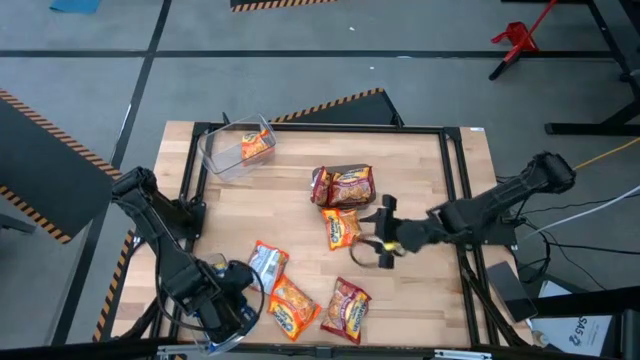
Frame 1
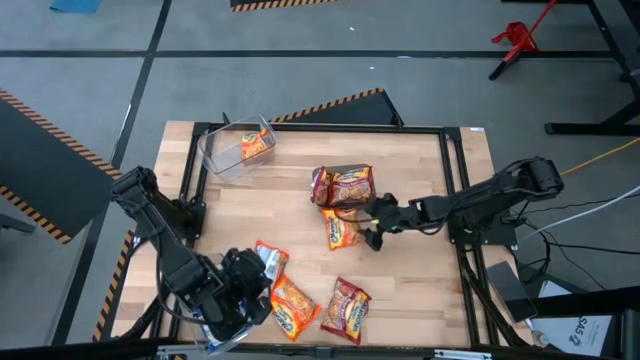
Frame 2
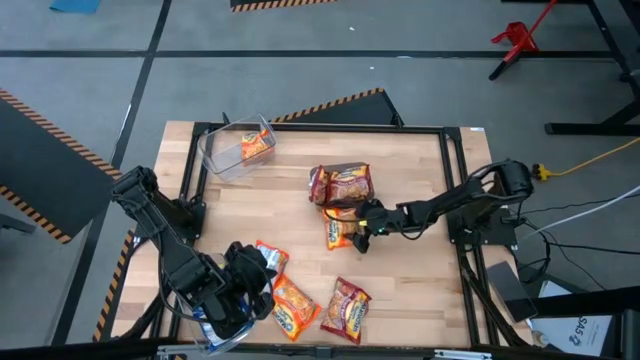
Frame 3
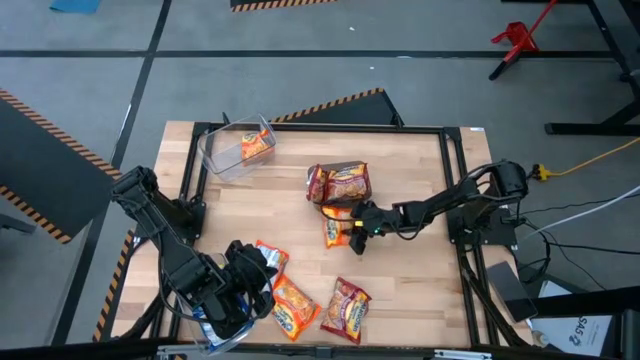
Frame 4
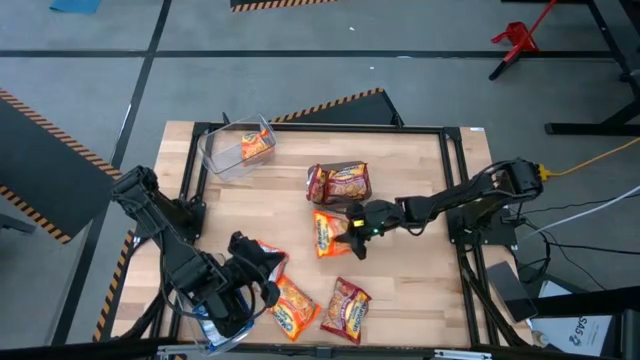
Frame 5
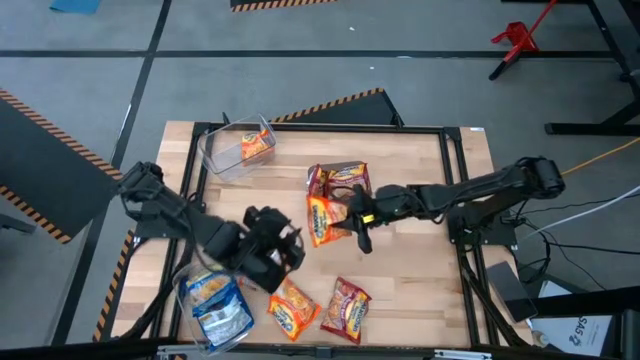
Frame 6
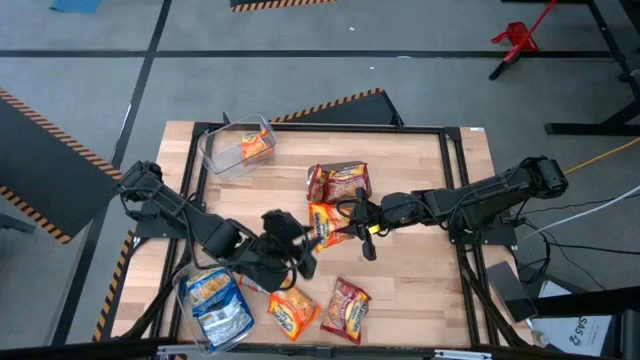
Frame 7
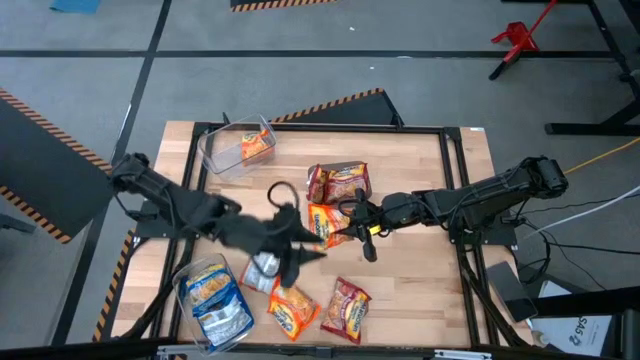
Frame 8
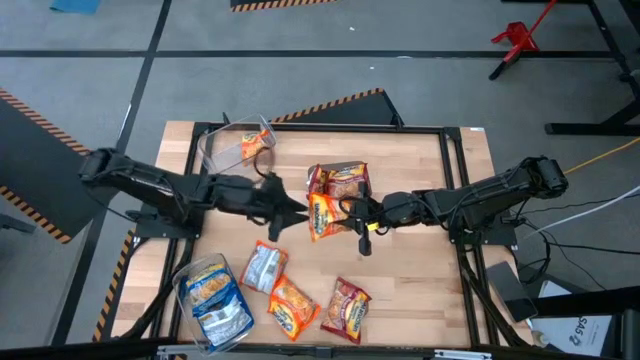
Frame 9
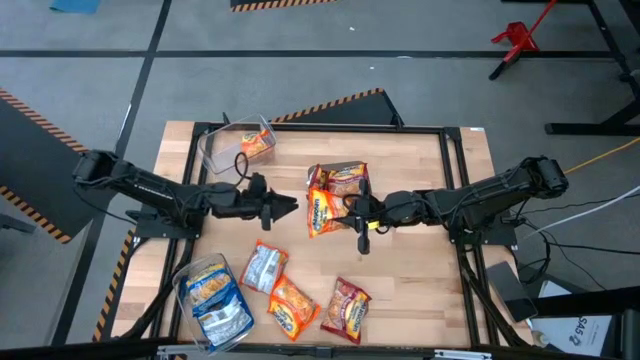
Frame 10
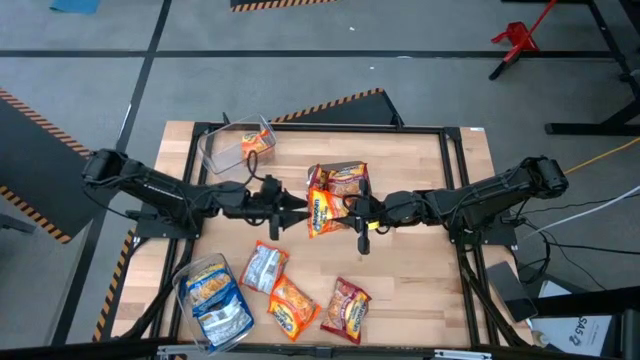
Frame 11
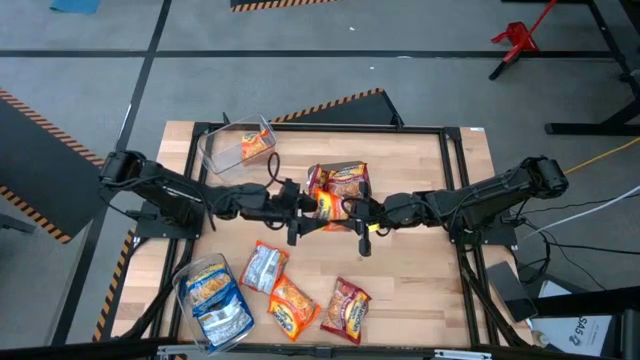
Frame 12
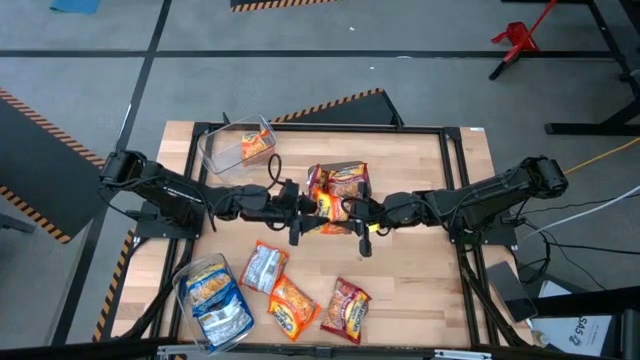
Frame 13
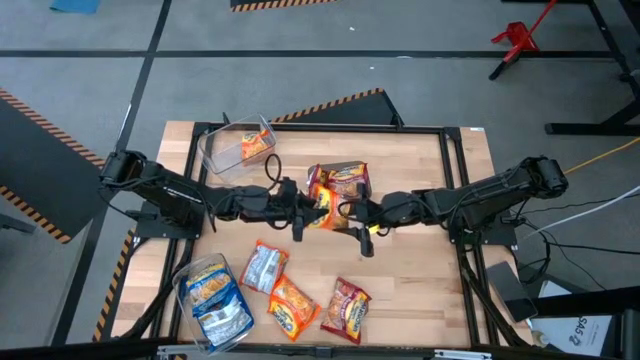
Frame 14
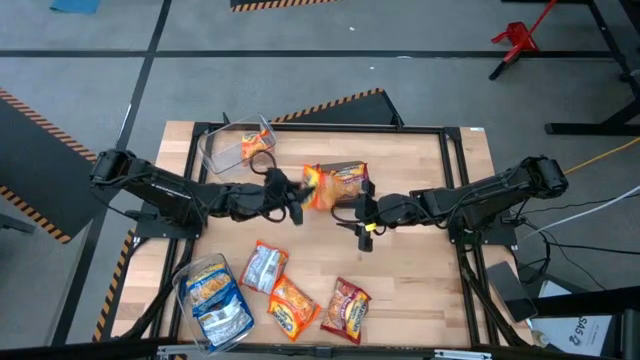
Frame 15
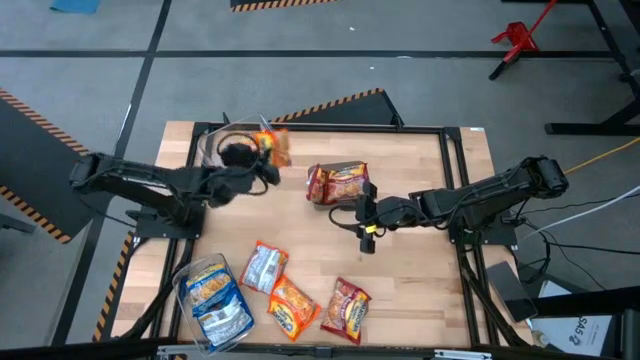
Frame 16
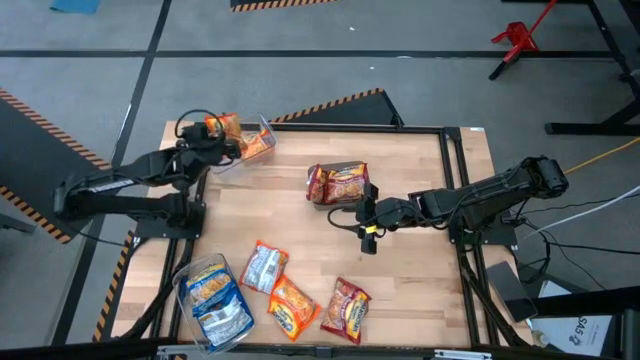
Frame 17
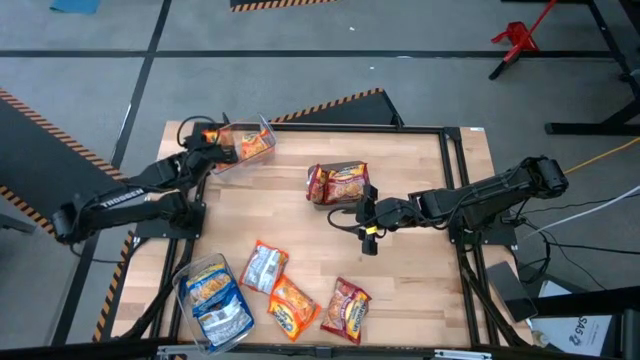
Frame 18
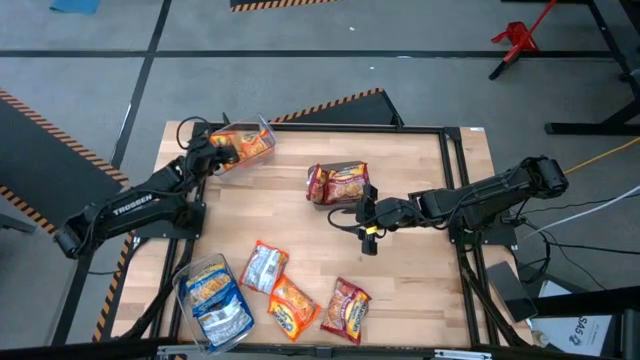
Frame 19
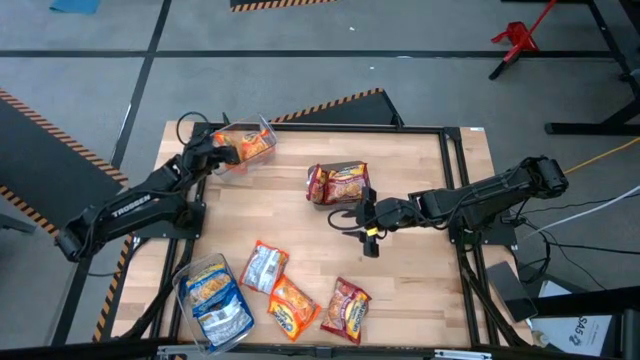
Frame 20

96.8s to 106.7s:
Task: Sort Maruchan noodles
Put the orange noodle pack into the top transparent bin

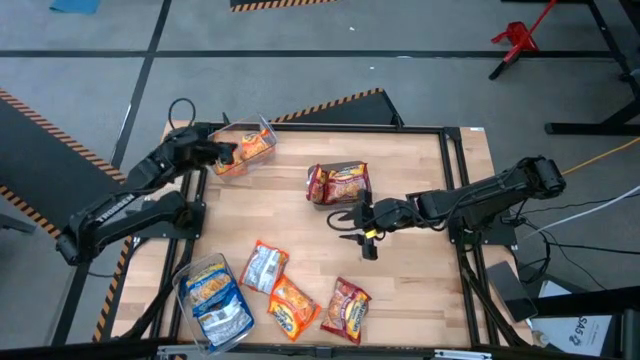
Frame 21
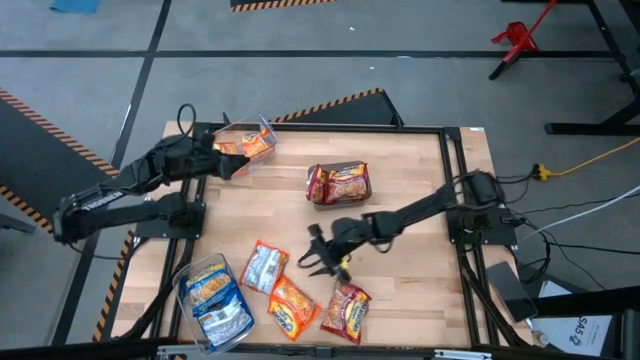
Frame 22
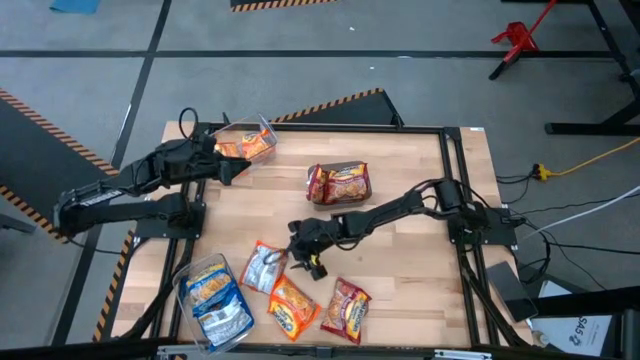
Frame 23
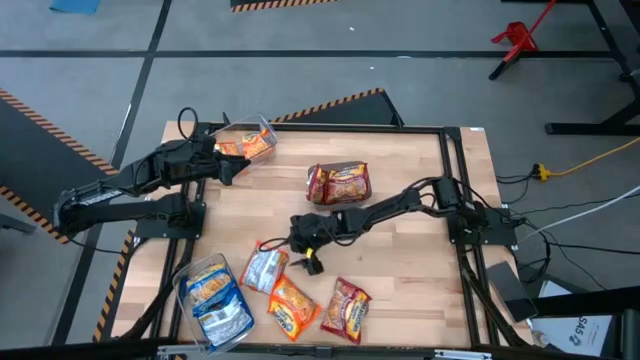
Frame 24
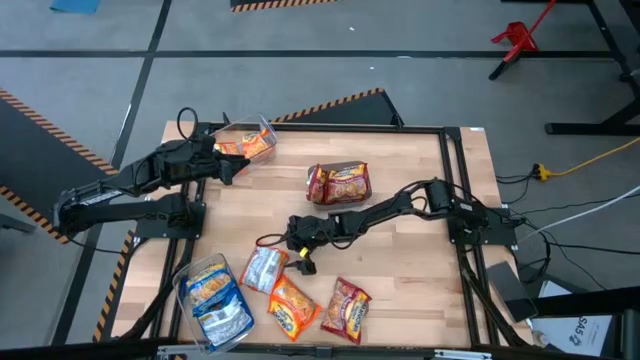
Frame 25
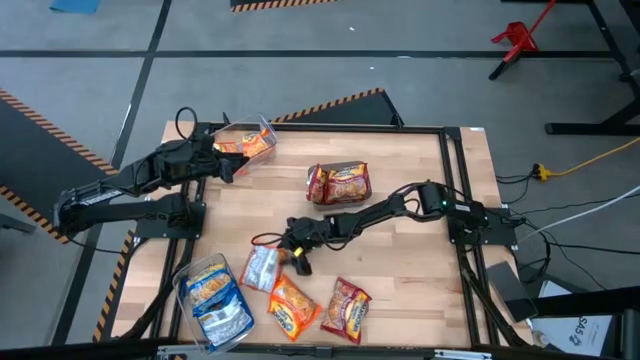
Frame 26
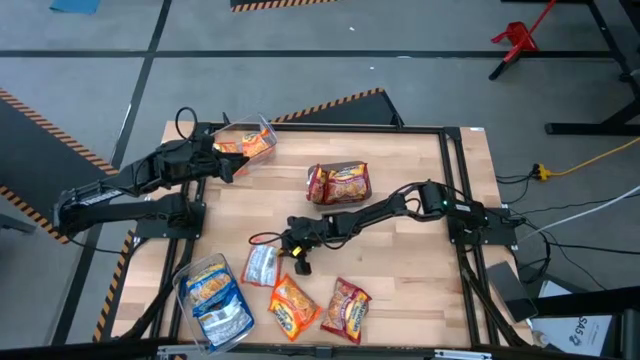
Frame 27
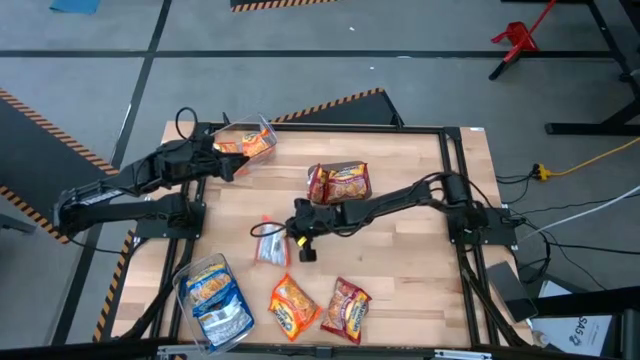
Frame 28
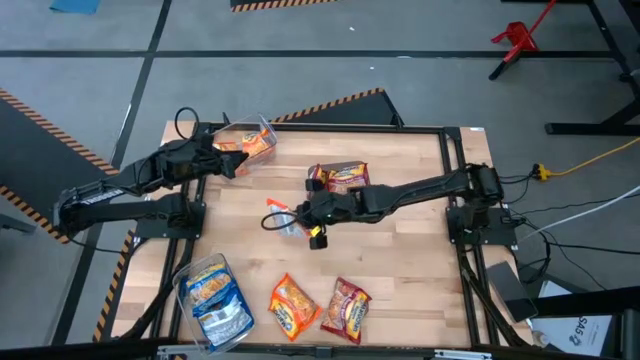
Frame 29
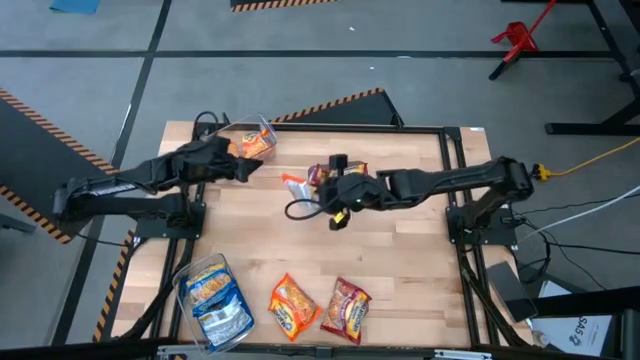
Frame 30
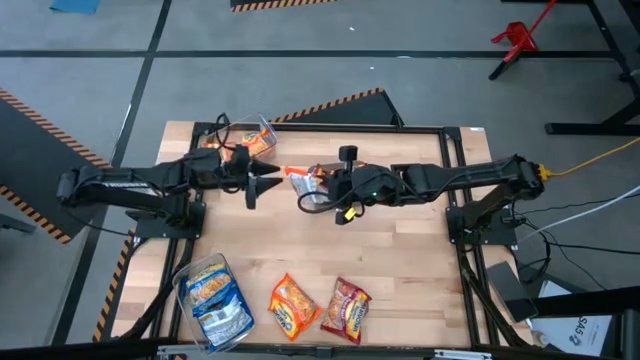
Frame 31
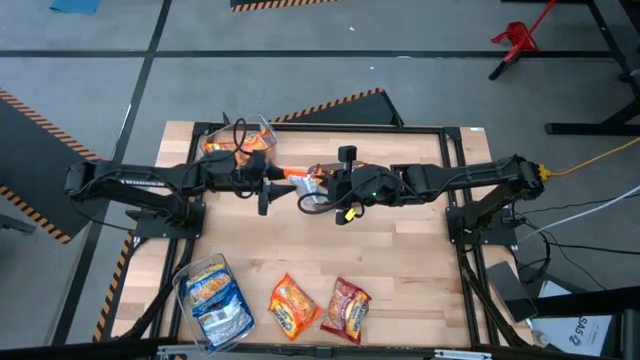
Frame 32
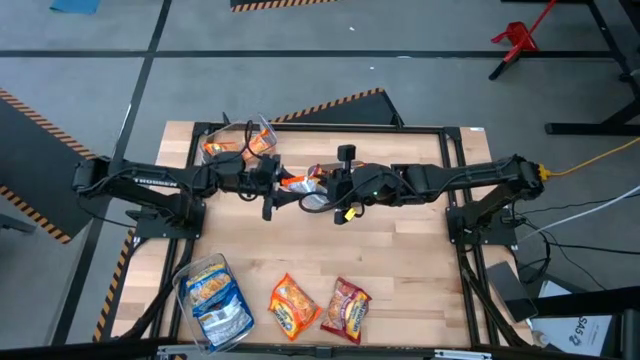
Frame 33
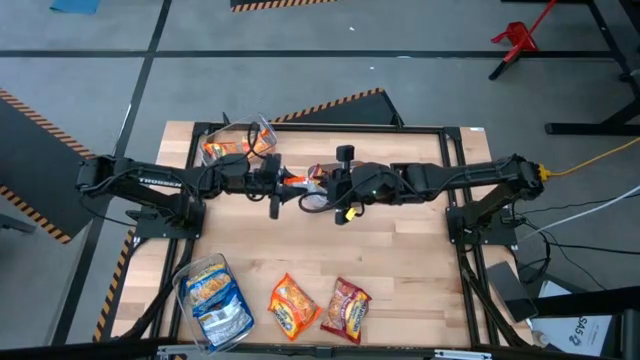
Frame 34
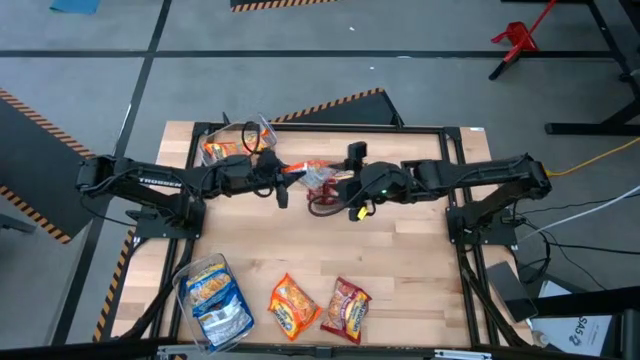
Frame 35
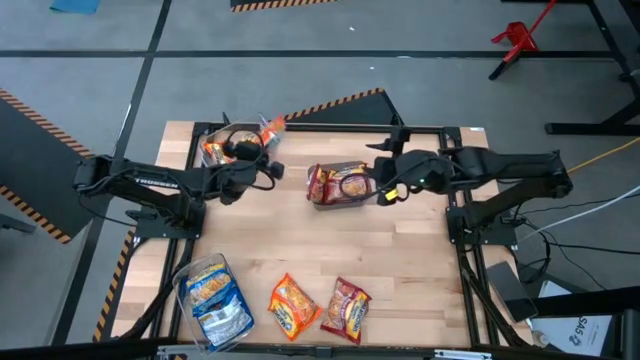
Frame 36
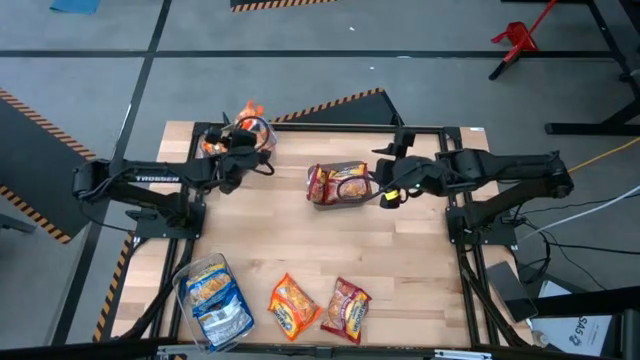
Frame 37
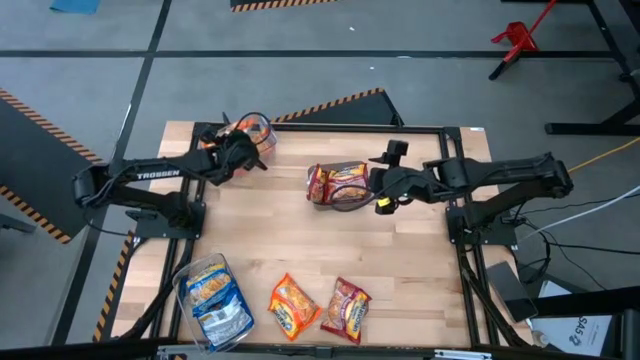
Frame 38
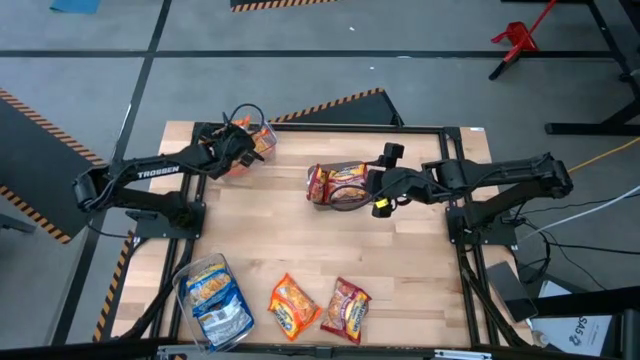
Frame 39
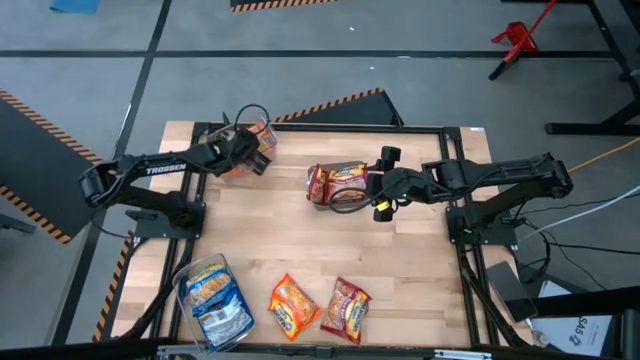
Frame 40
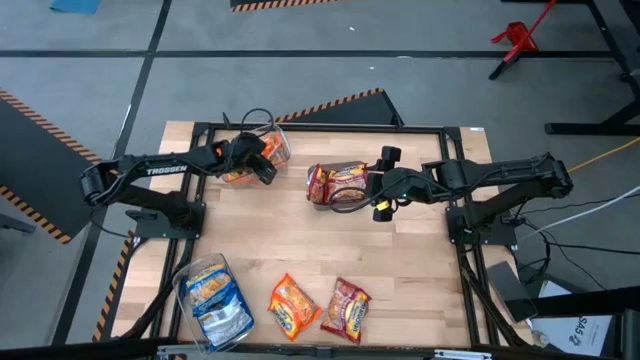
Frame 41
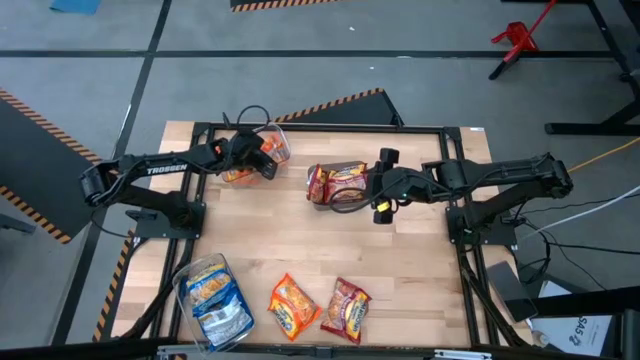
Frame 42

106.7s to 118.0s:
Put the orange noodle pack into the top transparent bin
